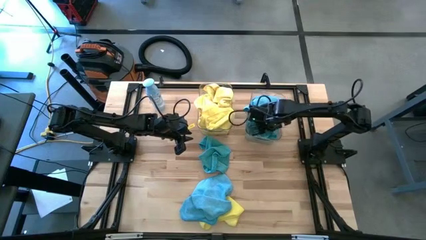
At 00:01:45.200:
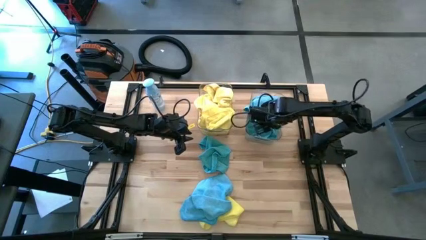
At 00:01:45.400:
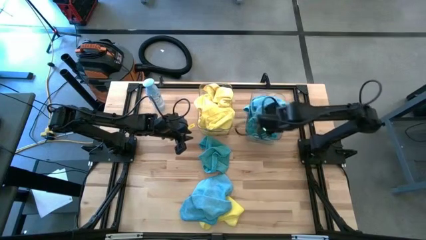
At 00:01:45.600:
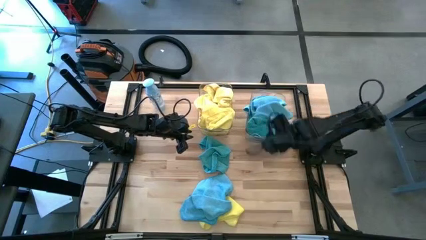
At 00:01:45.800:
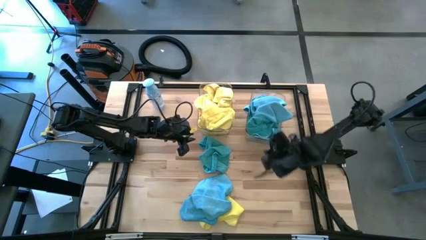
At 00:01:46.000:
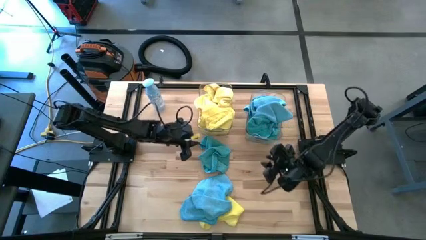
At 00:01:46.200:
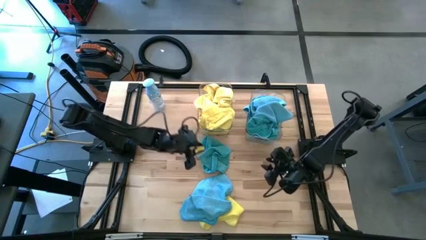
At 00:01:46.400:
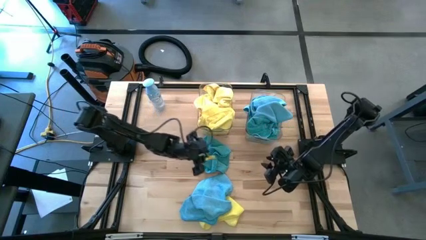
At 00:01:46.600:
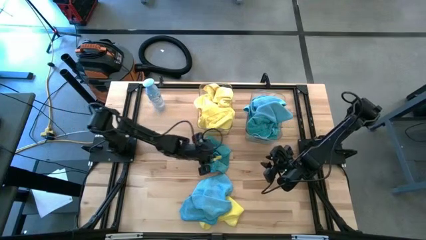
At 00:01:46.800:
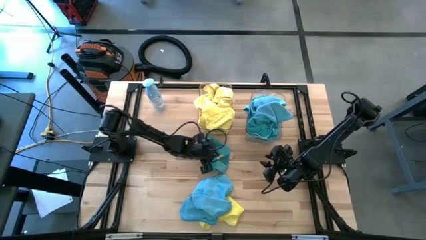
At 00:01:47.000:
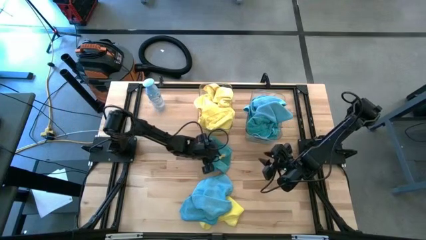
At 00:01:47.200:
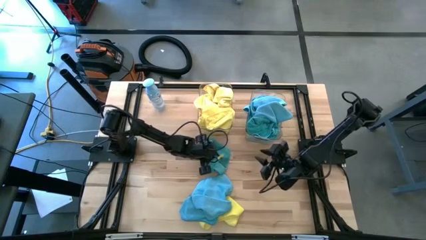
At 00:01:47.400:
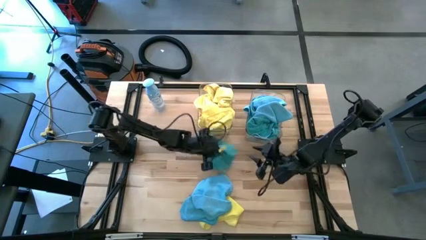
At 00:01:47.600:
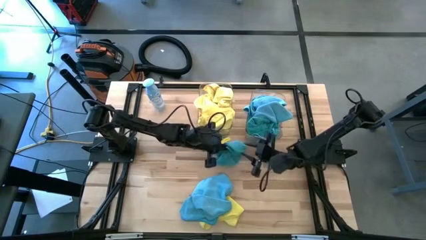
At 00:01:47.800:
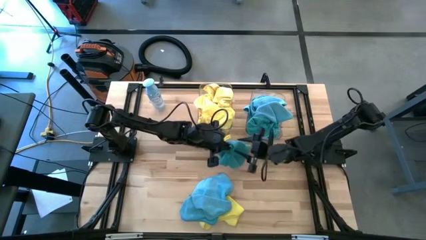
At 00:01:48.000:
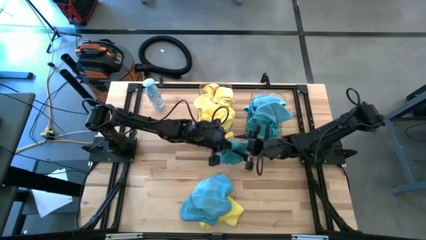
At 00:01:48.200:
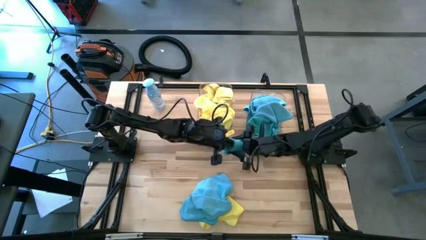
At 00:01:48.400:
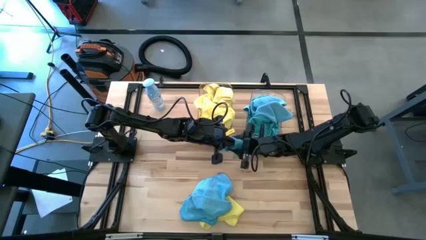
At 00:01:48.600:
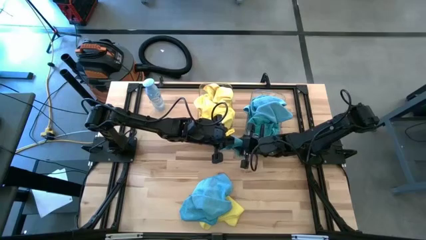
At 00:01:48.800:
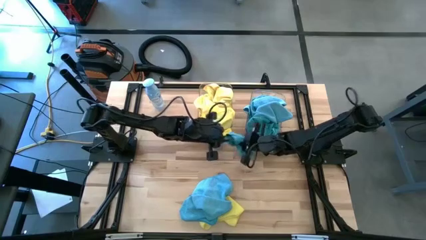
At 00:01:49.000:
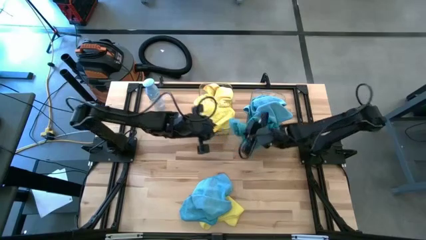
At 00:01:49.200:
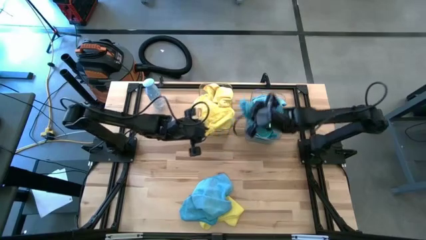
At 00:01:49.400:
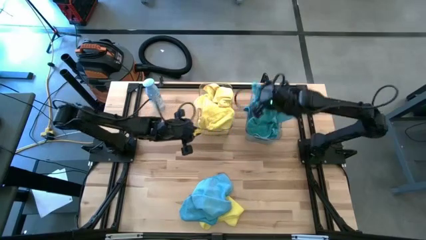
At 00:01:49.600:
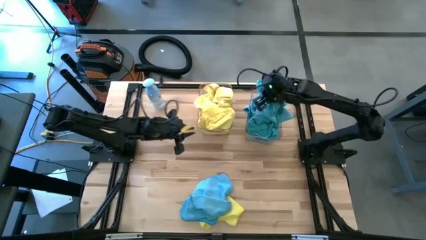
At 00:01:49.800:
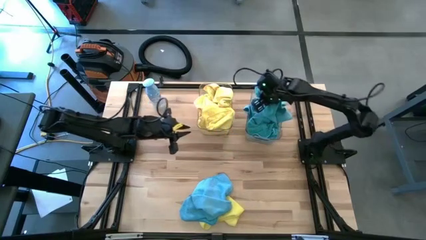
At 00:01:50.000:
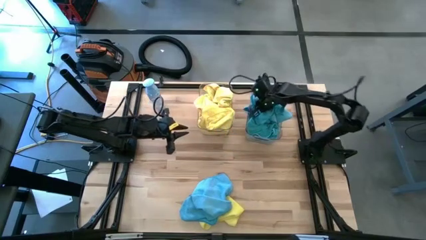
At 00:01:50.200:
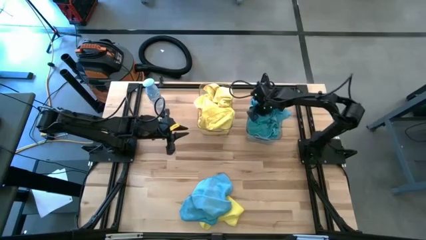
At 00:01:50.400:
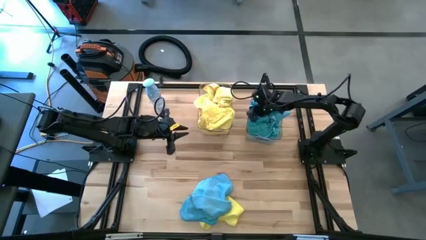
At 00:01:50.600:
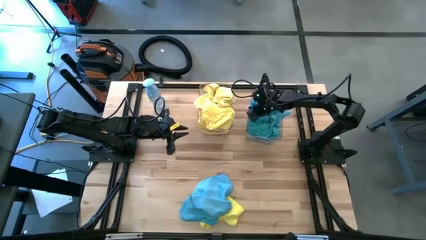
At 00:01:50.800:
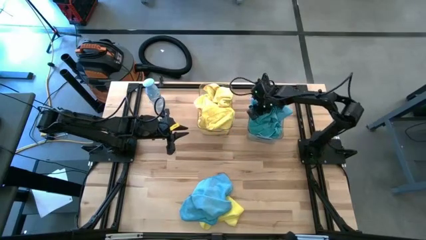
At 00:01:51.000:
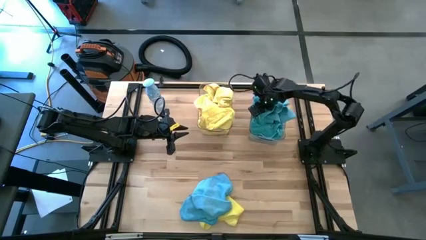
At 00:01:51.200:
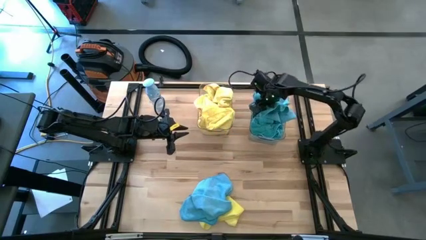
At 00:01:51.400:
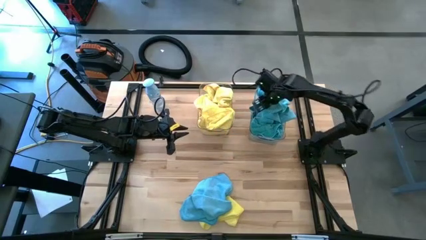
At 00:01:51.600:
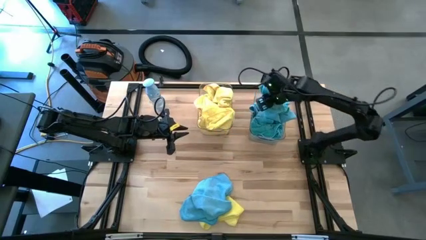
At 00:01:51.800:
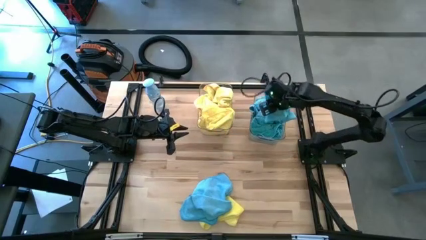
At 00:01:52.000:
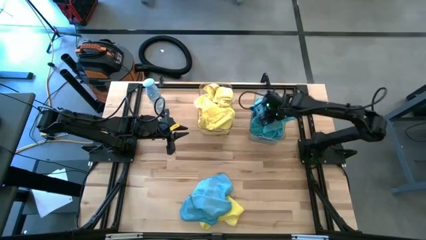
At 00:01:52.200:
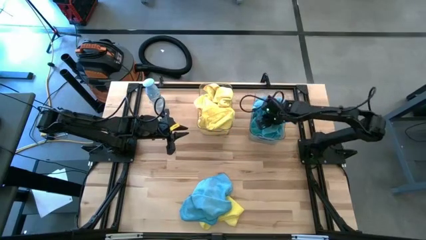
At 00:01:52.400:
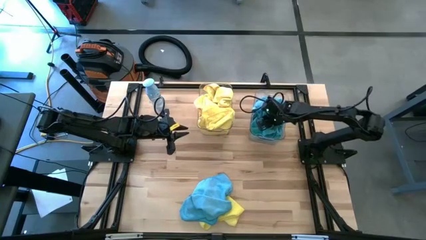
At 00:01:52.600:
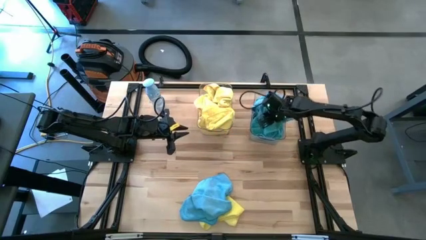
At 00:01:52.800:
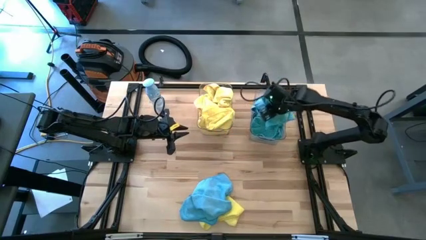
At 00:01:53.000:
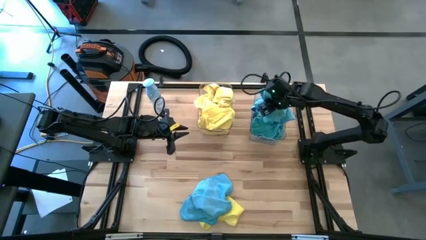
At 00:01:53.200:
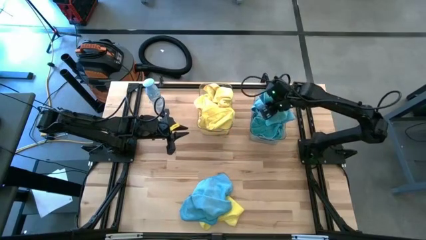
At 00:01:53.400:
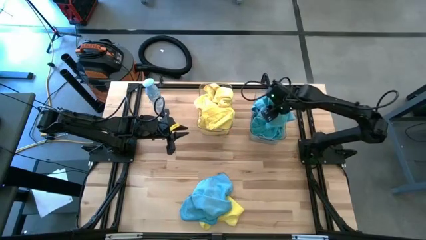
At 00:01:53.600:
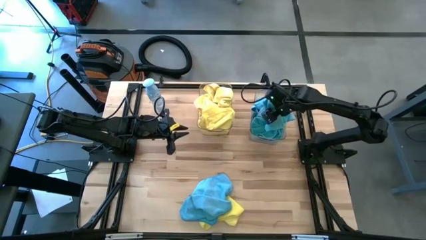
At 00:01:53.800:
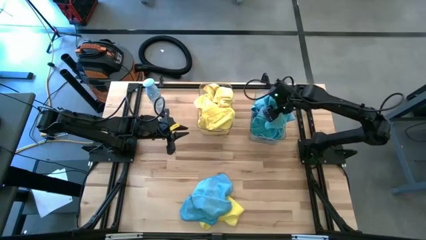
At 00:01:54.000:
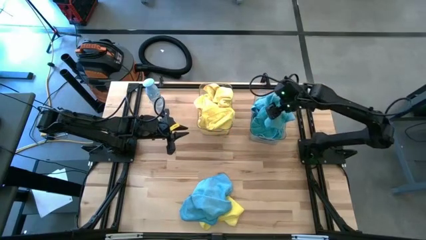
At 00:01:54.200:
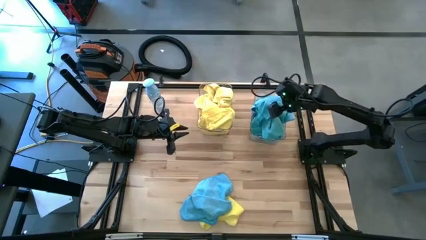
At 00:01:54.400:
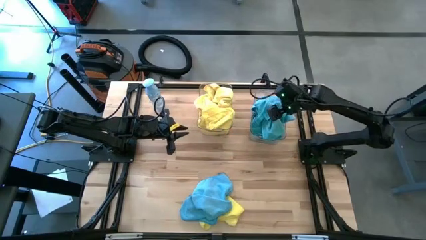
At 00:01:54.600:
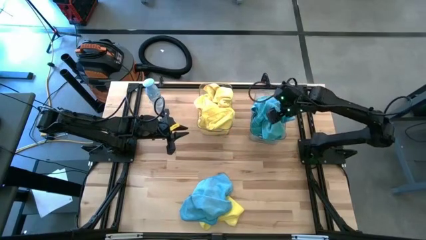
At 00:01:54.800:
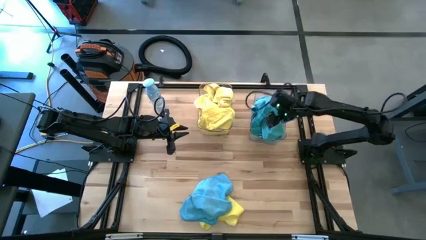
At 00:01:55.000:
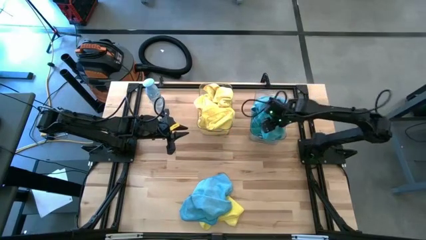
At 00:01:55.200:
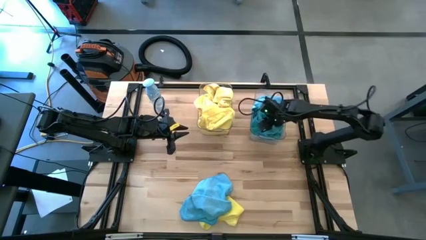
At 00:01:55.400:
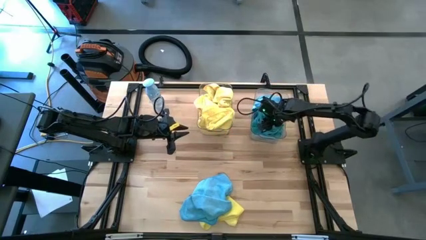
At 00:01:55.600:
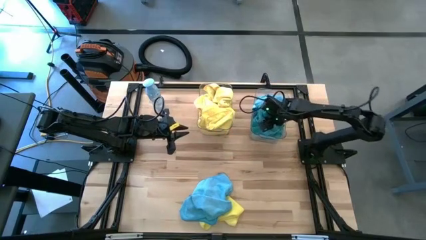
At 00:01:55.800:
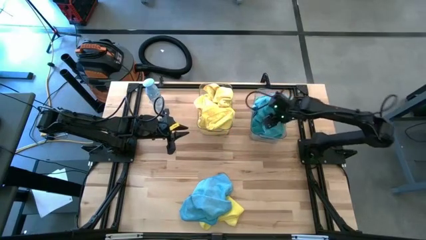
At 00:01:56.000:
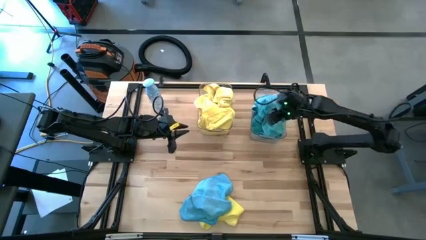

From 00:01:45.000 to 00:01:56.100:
Task: Sort microfiber towel by color & place in baskets
Put the blue towel into the right transparent bin

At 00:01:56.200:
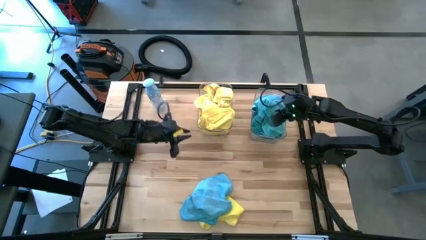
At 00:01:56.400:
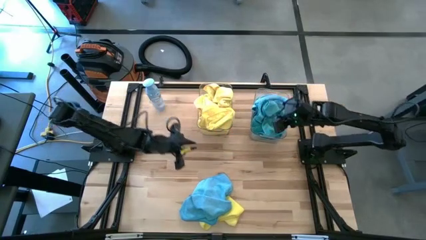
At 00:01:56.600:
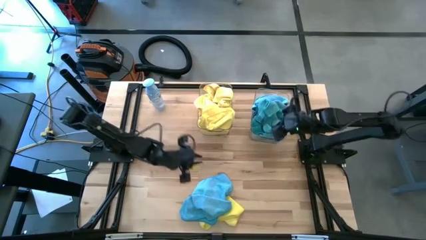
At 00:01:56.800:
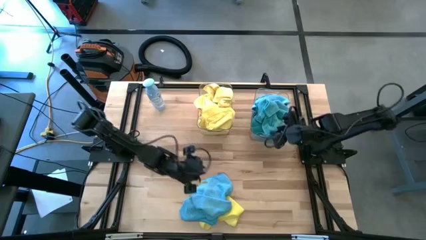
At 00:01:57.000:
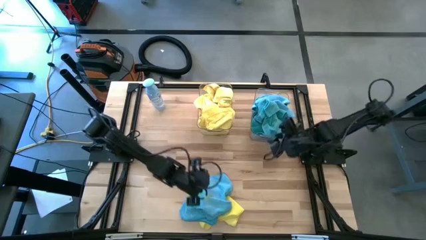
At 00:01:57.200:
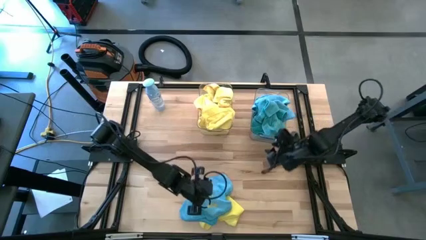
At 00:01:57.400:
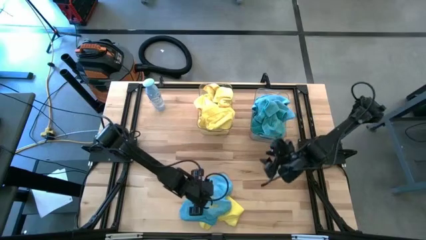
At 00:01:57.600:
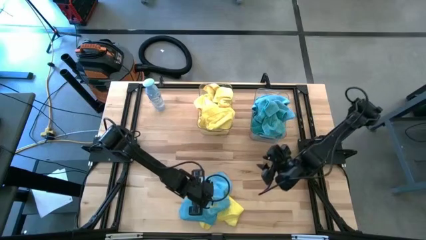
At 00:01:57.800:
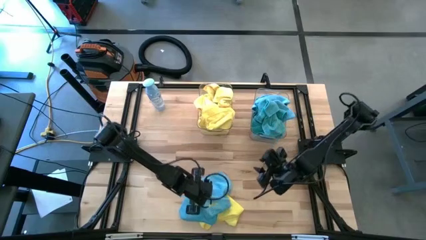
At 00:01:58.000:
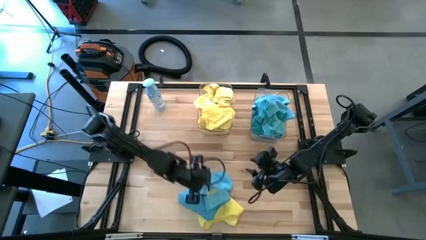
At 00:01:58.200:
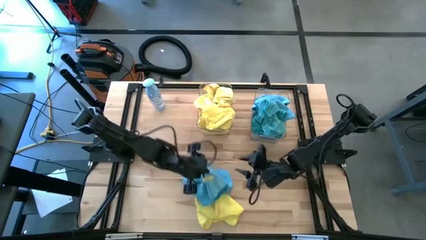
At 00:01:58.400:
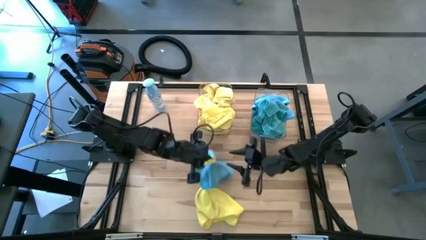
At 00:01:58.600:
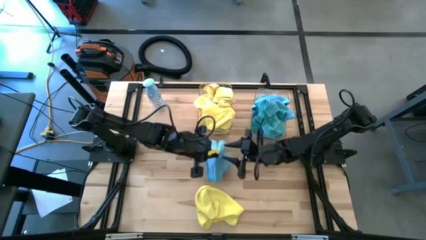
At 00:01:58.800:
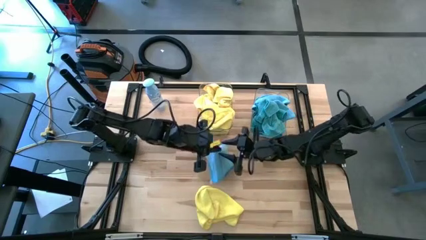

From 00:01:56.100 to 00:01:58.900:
Put the blue towel into the right transparent bin

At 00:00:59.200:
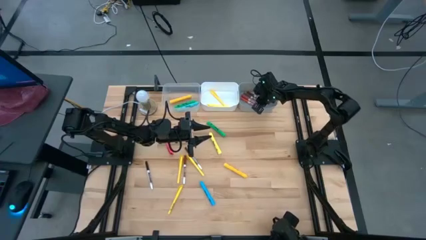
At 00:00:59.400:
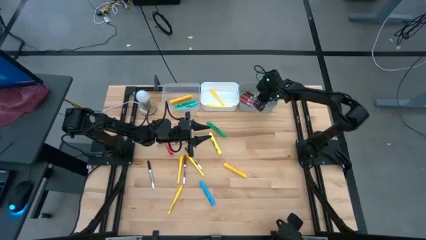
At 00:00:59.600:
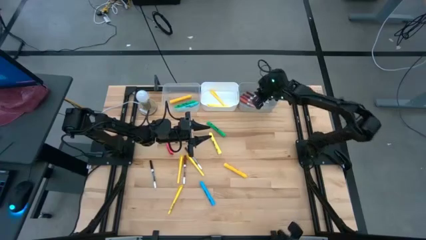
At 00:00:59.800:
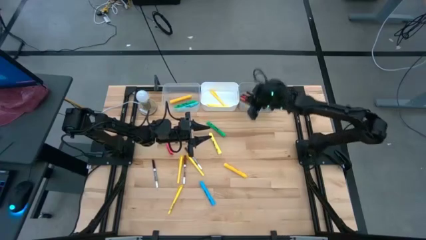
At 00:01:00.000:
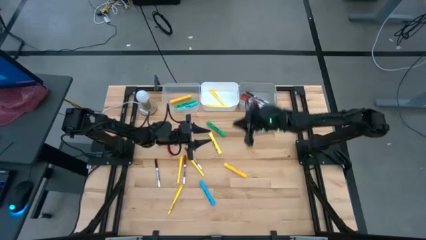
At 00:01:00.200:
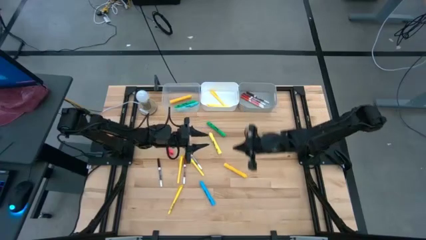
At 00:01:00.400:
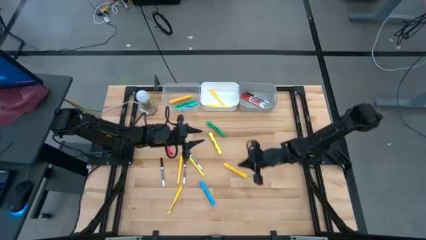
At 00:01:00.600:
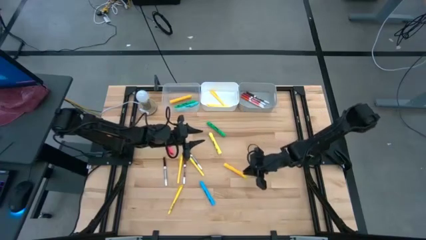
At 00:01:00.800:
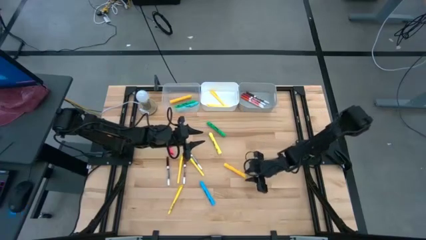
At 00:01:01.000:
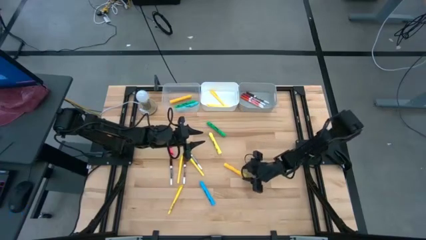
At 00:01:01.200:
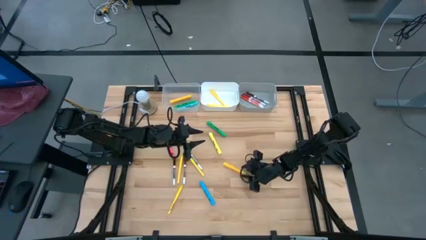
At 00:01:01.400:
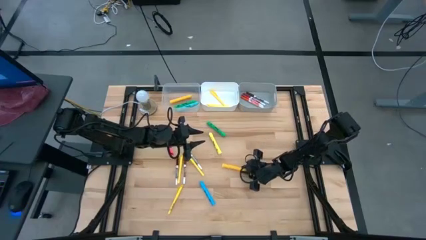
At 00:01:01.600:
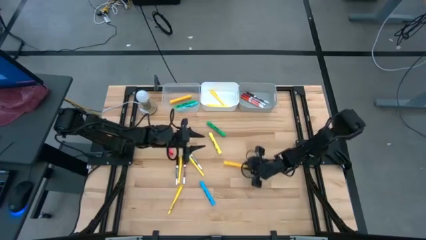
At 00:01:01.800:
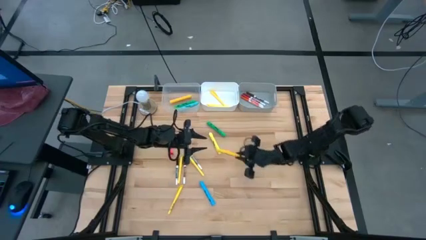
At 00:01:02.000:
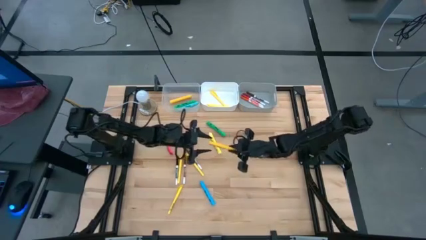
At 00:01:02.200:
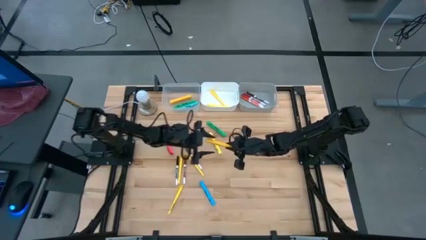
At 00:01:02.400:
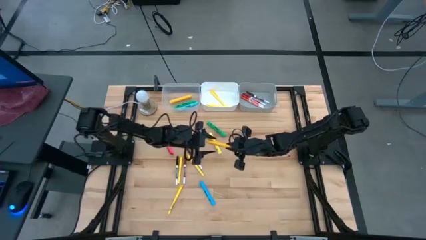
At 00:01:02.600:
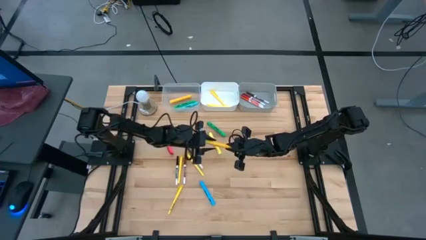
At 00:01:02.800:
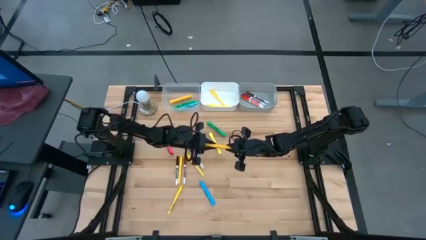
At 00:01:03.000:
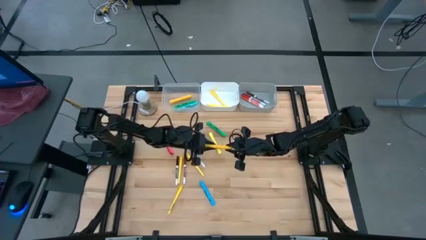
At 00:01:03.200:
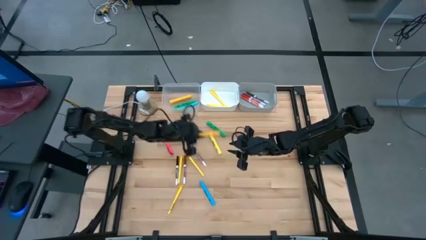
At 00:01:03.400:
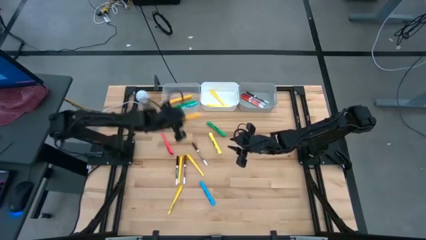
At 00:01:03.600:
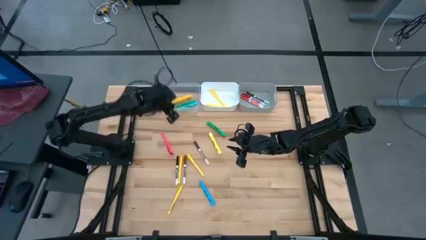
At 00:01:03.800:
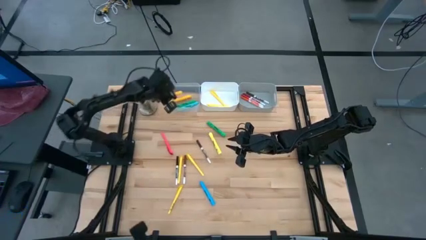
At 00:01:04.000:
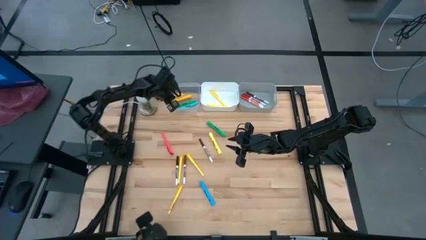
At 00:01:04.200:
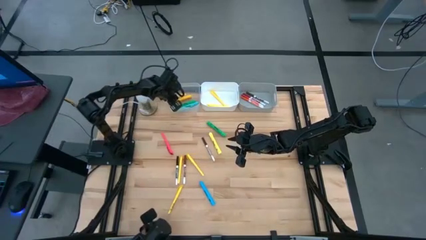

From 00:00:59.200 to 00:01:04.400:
Task: Pick & Place Markers
Put the yellow highlighter pen into the transparent bin
